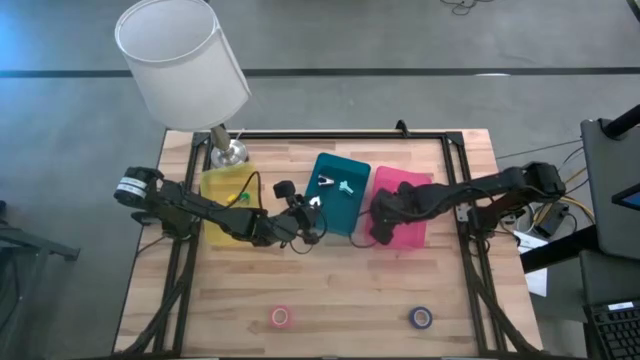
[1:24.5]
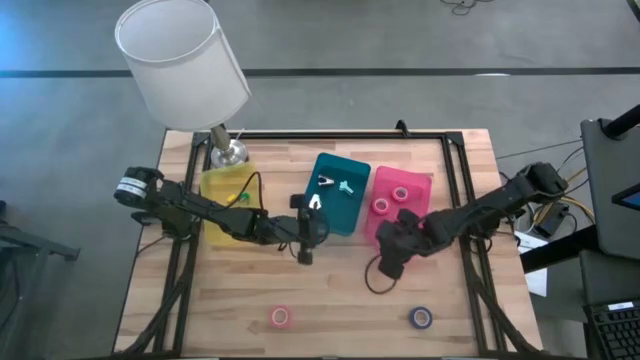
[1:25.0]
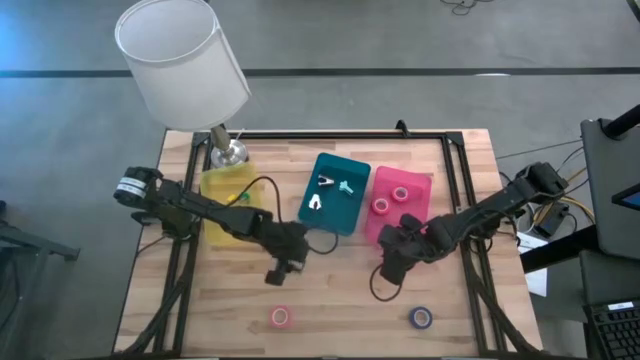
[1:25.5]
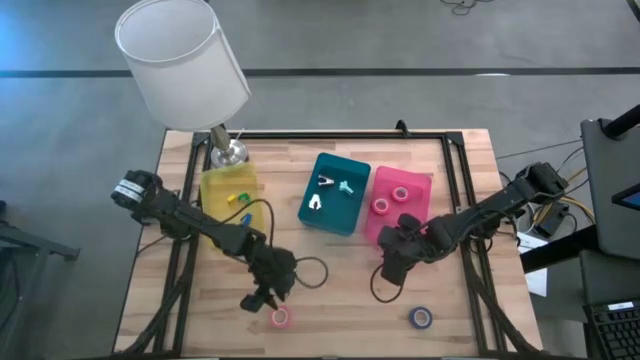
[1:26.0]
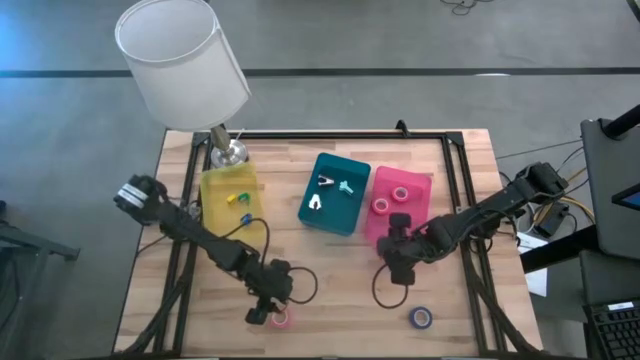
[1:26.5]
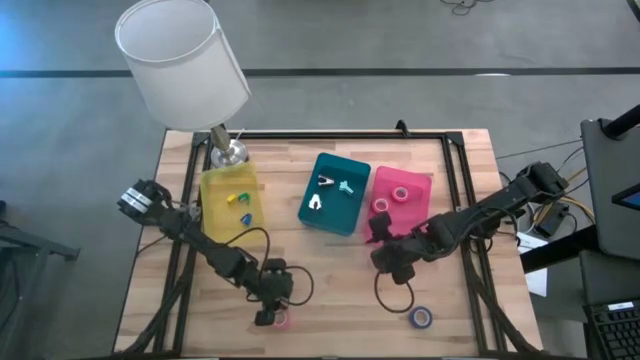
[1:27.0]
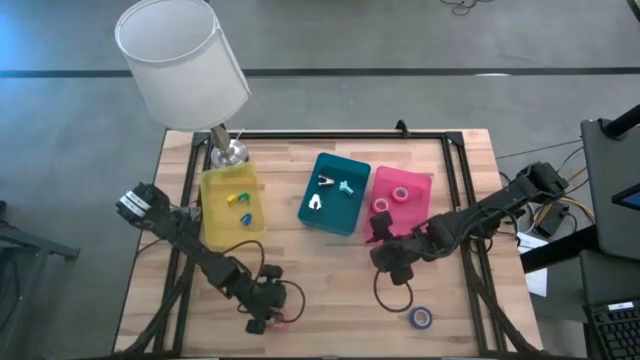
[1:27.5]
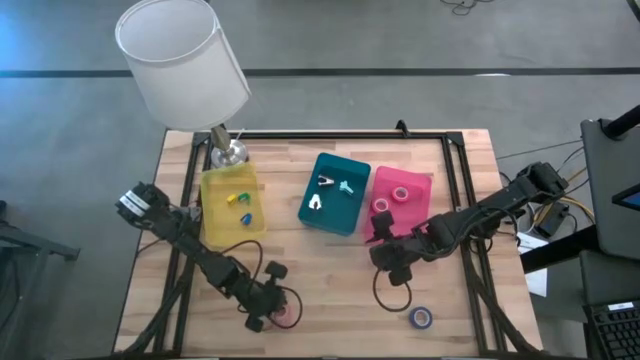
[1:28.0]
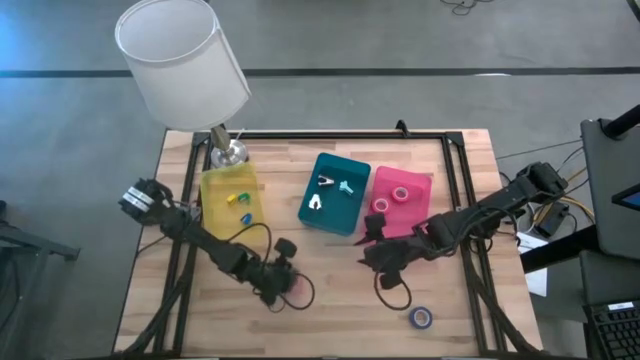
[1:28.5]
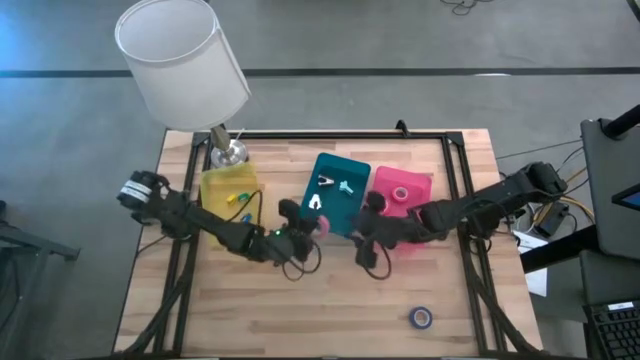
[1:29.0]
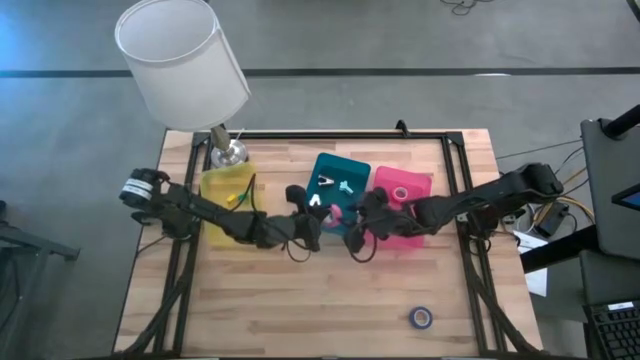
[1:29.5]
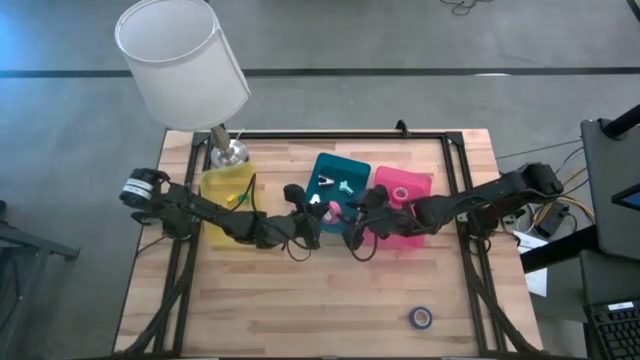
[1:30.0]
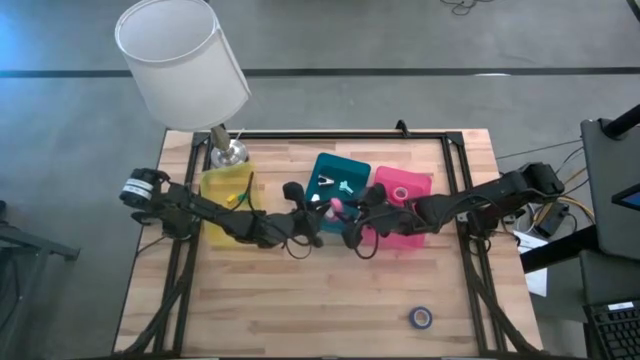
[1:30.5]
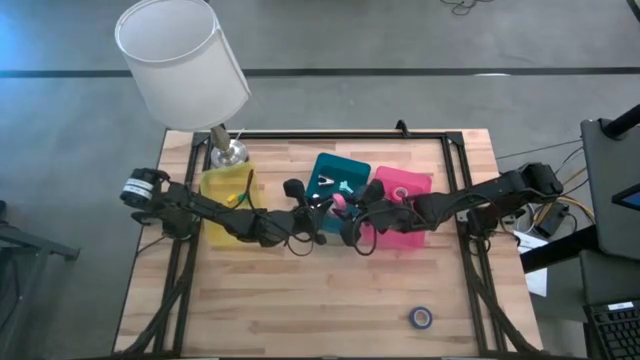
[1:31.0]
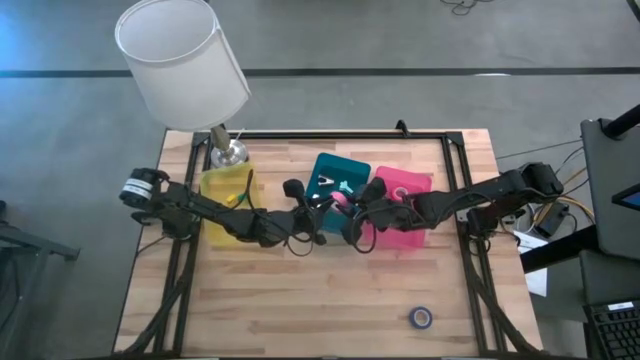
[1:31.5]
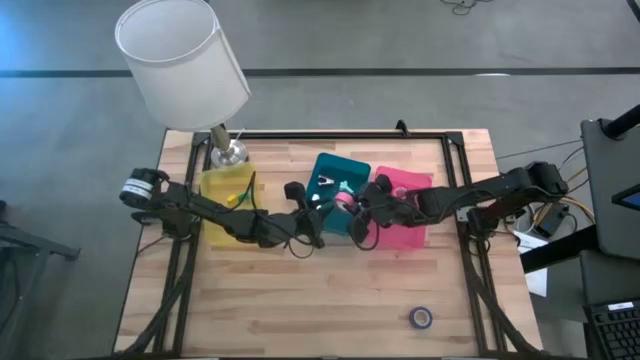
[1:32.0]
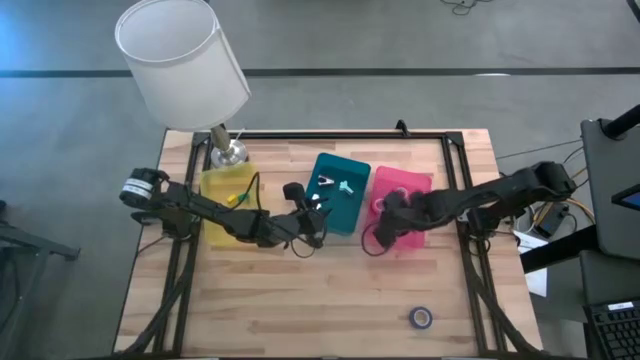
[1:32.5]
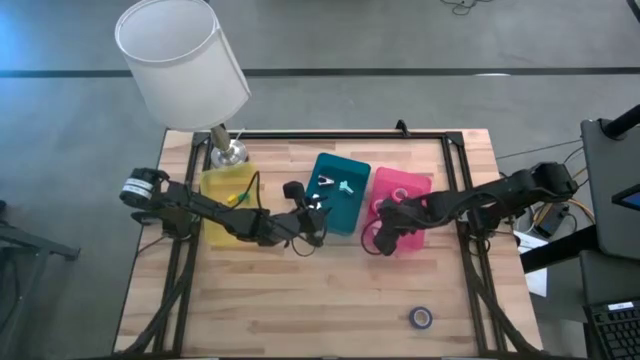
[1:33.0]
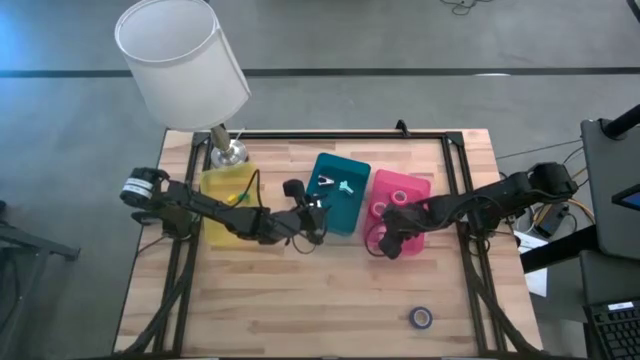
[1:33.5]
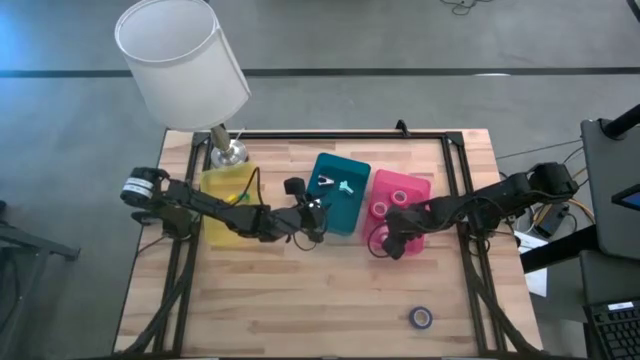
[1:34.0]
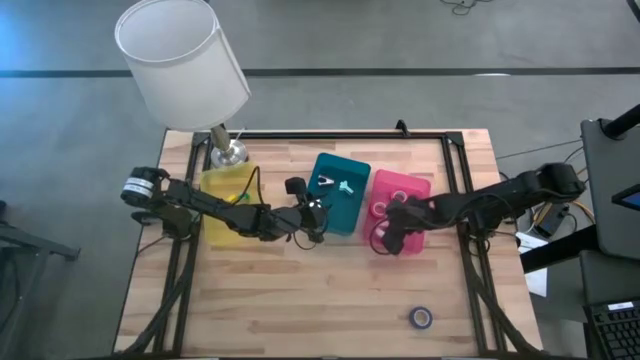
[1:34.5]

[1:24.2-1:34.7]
Task: Pick and place Stapler, Stapler remover, tape
Put the pink tape into the pink bin

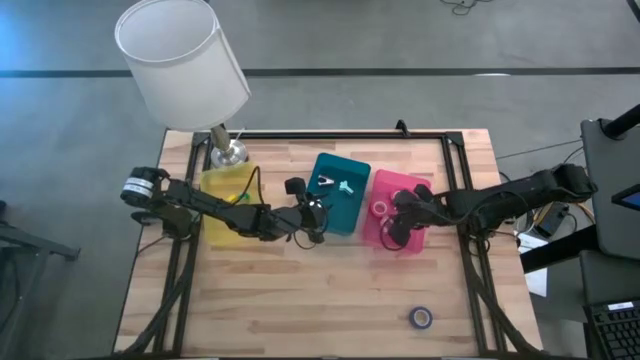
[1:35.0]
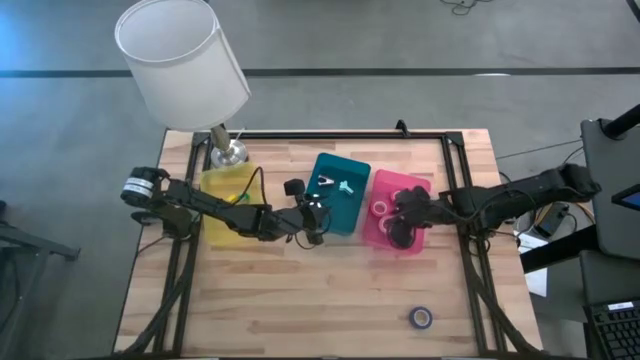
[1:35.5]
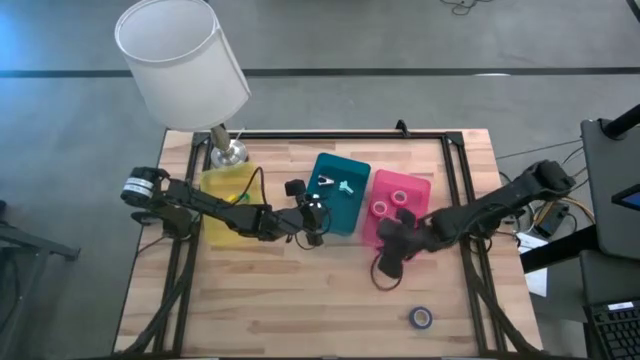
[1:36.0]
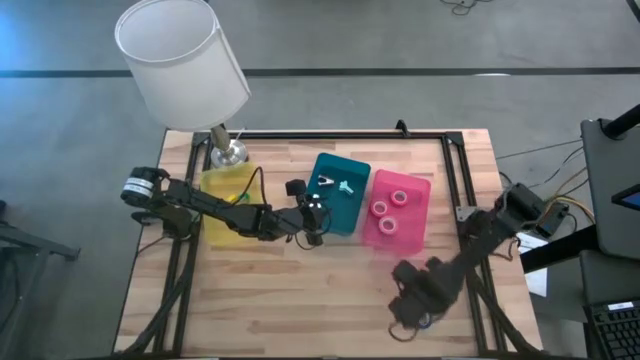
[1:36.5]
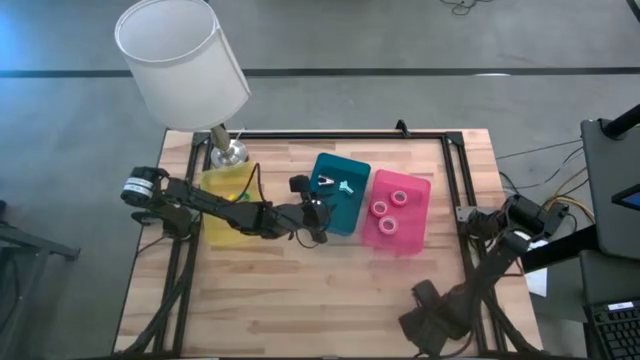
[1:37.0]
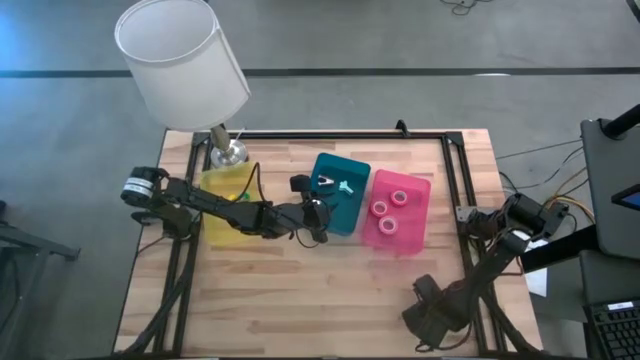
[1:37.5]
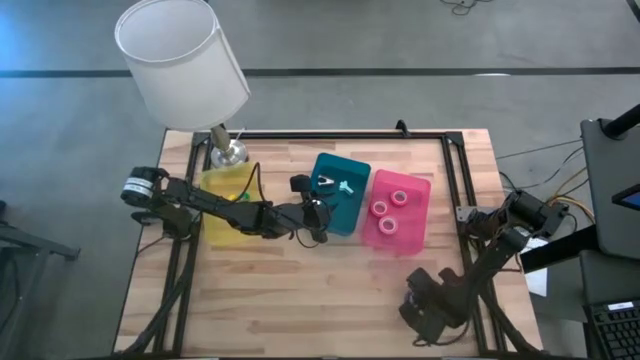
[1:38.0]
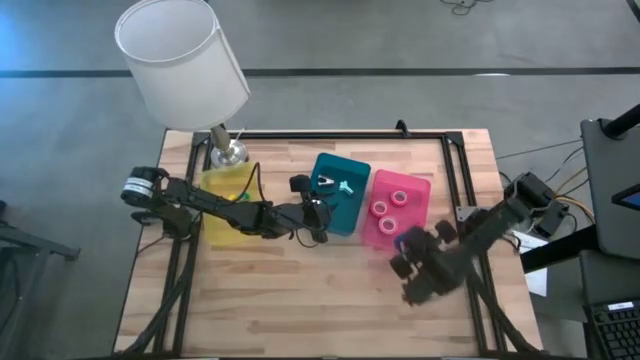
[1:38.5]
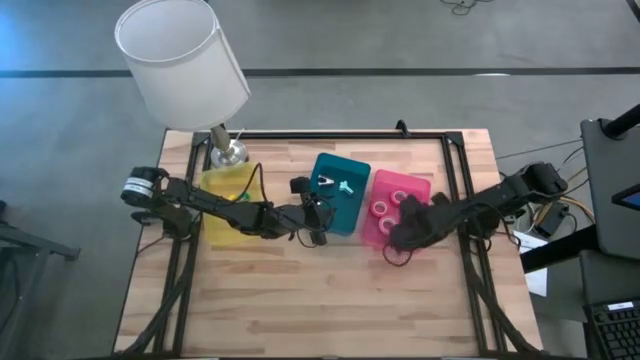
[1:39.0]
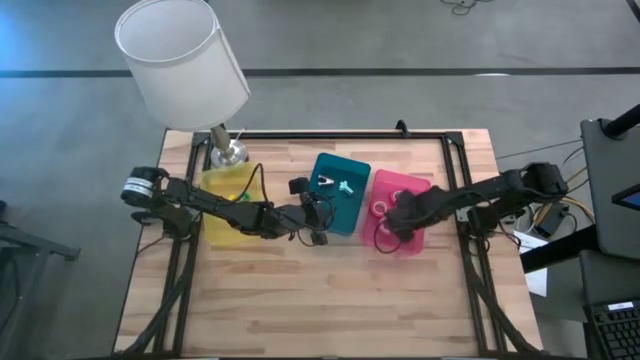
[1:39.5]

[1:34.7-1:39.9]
Put the blue tape into the pink bin

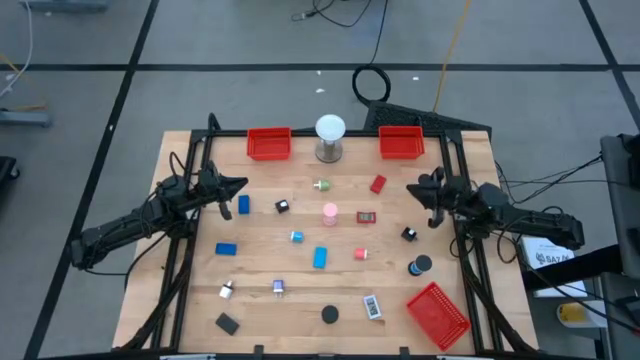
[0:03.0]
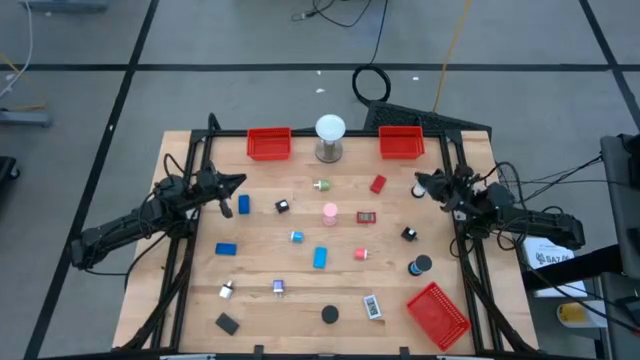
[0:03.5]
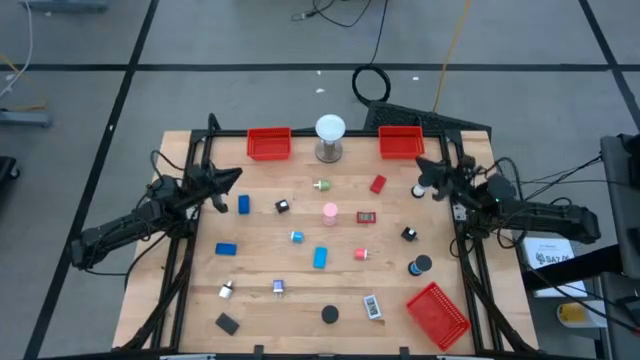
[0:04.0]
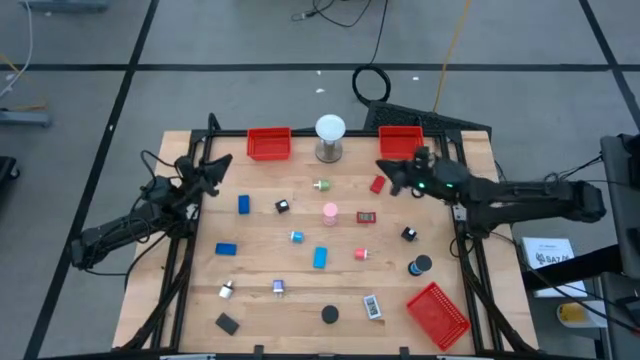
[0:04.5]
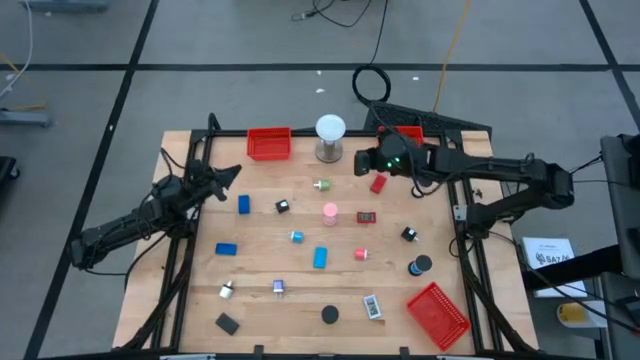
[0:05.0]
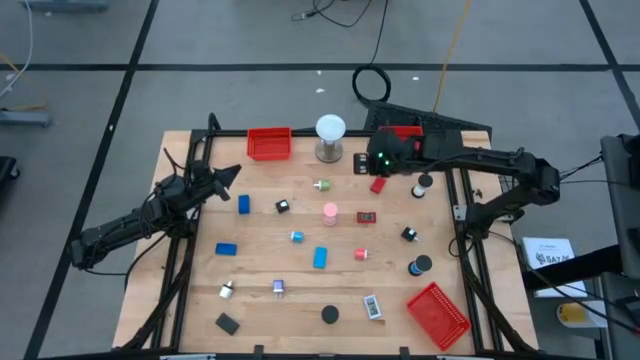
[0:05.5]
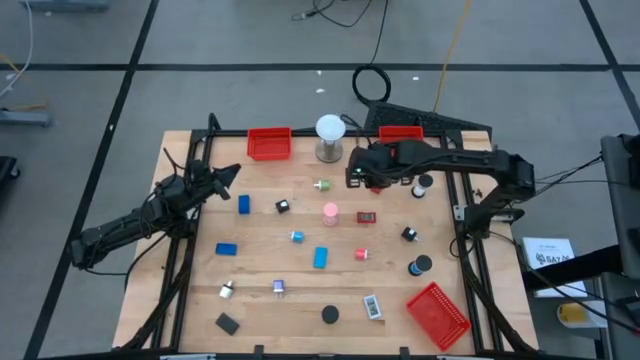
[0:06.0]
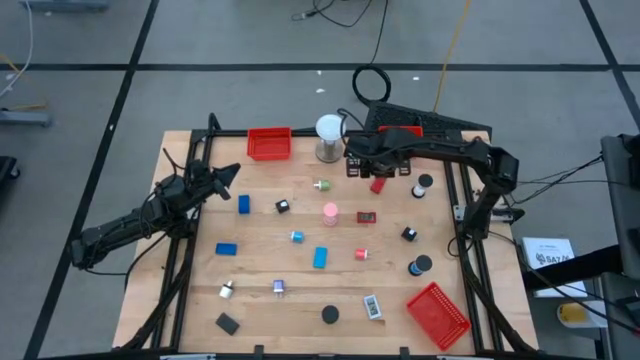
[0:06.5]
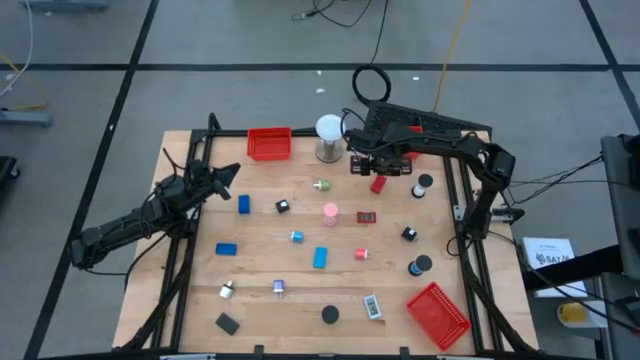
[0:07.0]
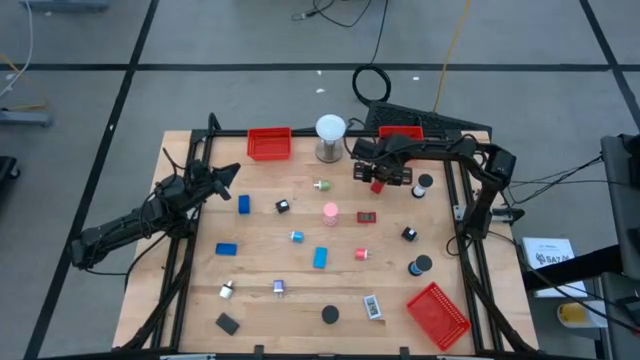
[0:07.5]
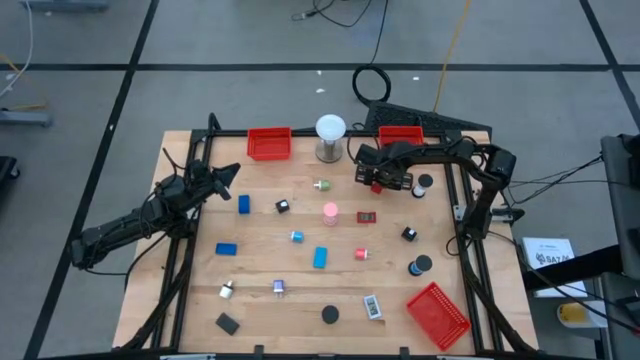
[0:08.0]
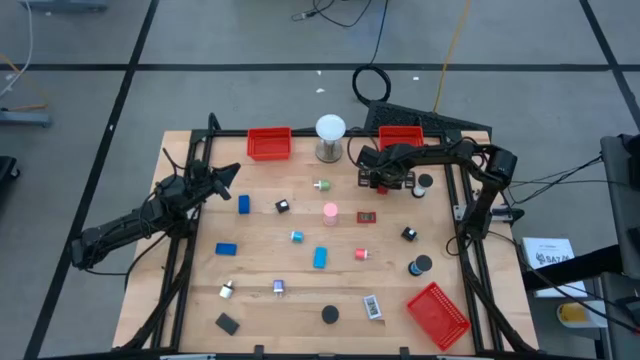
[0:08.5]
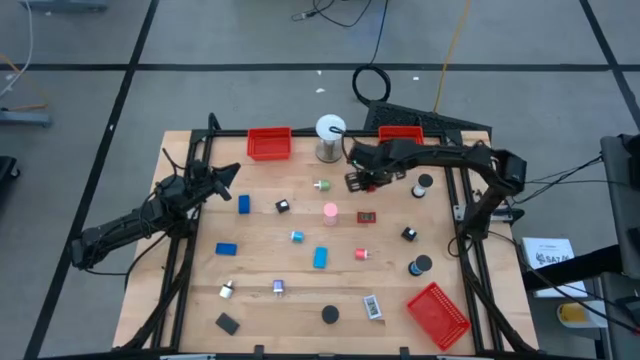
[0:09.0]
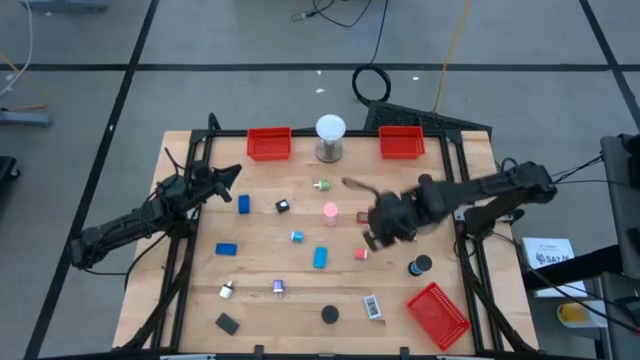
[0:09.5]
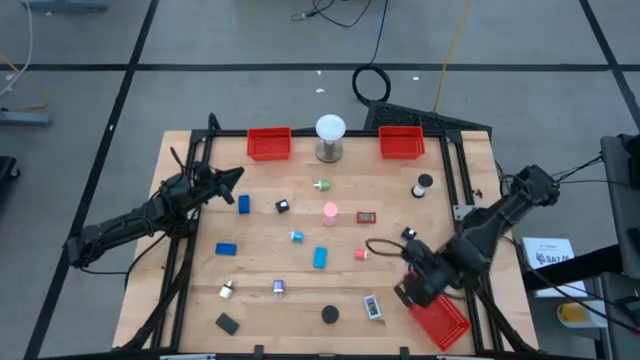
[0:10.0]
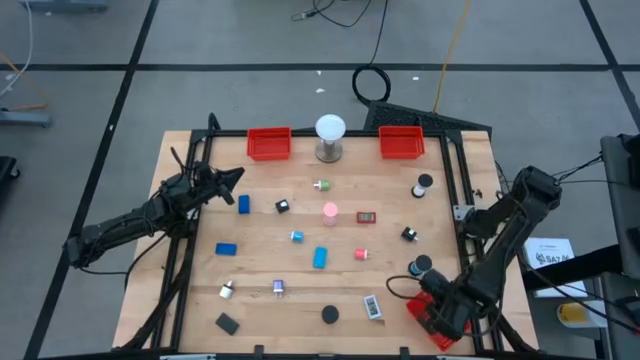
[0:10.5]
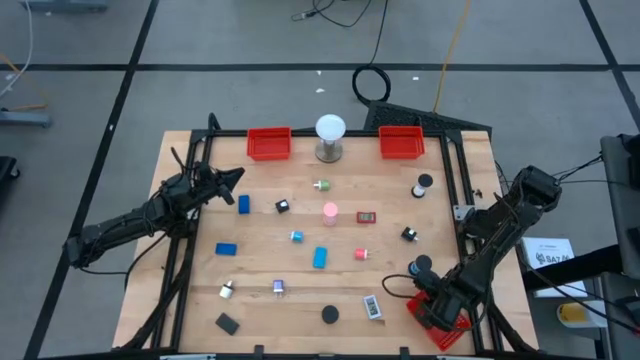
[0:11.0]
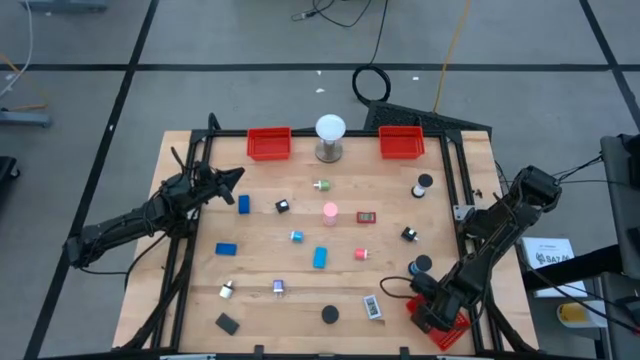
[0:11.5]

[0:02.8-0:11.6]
Task: Pick & Place Office items
Put the red digital clock into the bottom right red bin
